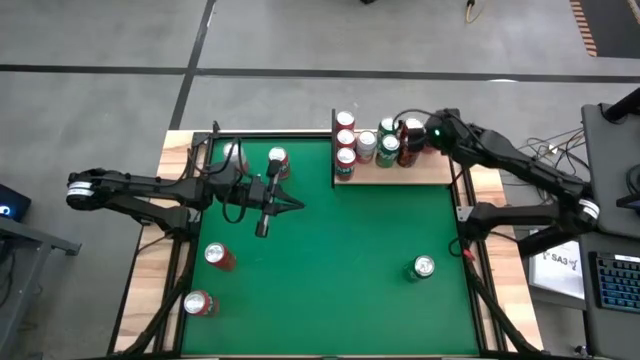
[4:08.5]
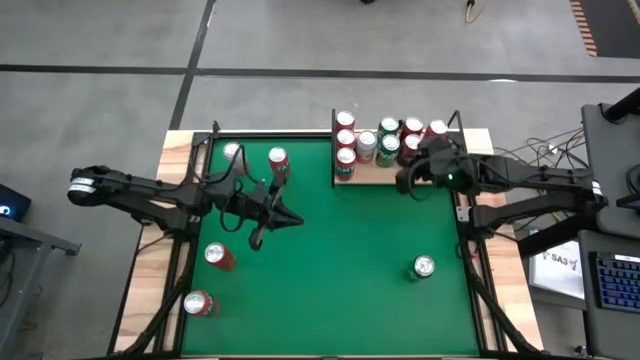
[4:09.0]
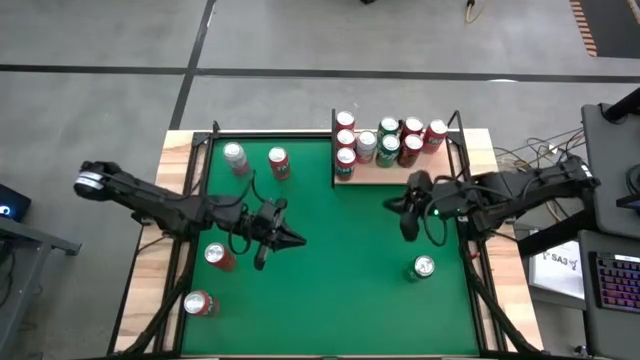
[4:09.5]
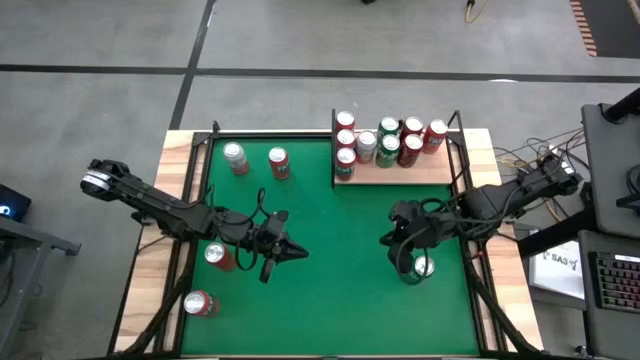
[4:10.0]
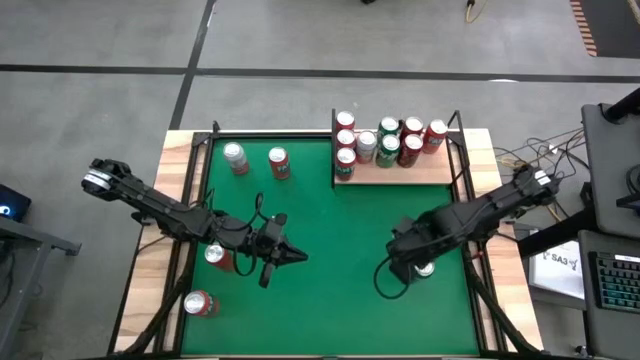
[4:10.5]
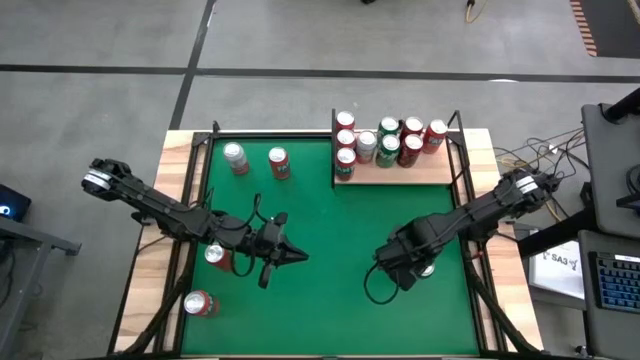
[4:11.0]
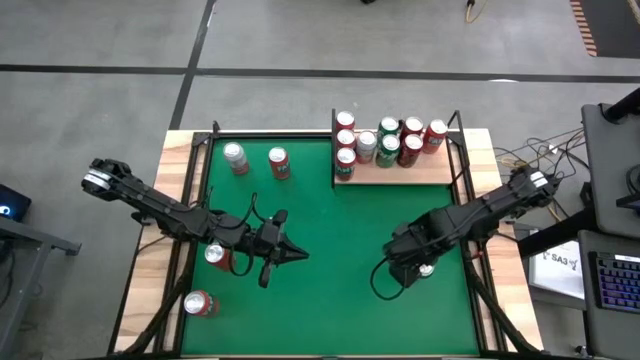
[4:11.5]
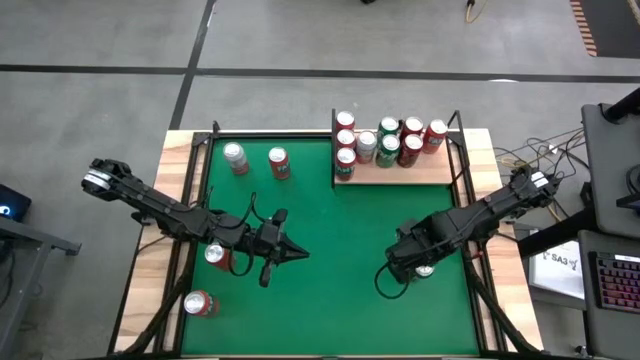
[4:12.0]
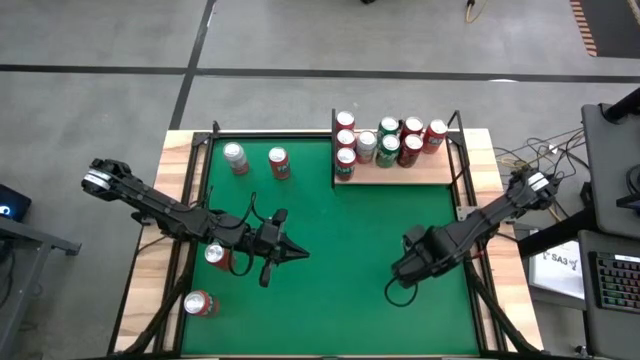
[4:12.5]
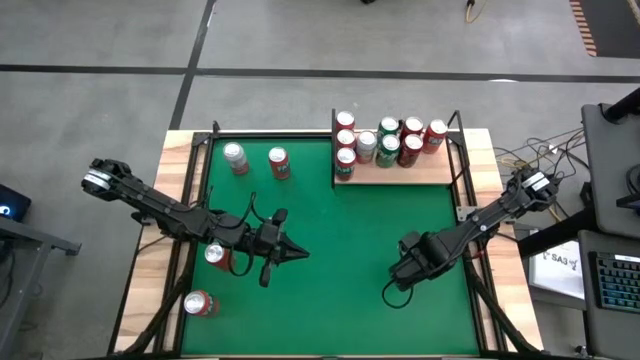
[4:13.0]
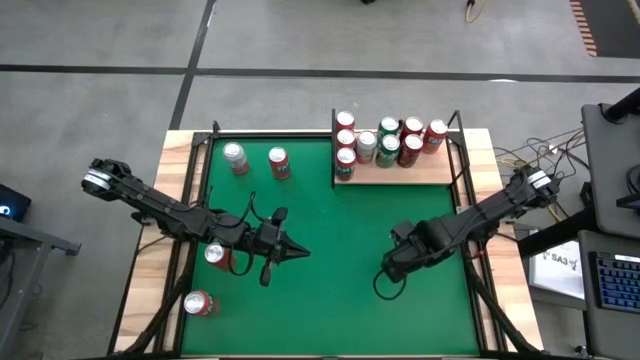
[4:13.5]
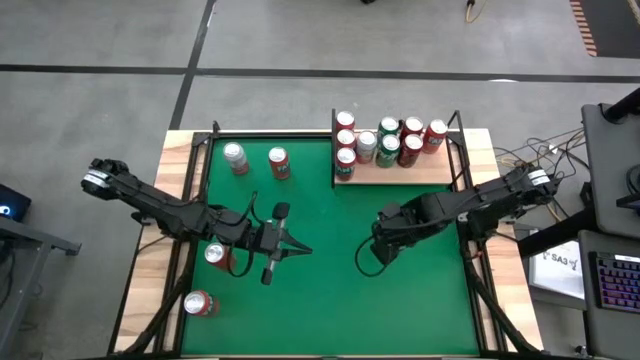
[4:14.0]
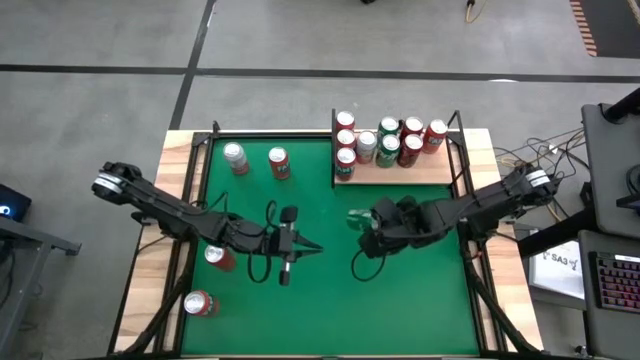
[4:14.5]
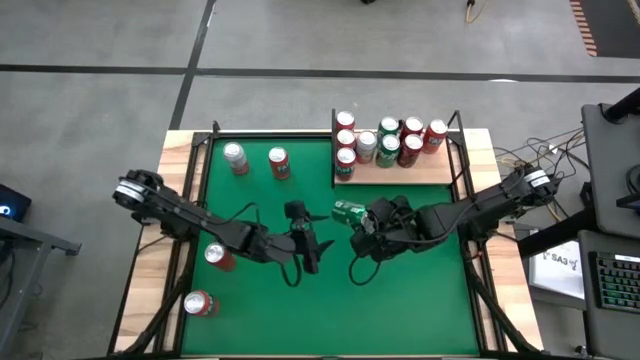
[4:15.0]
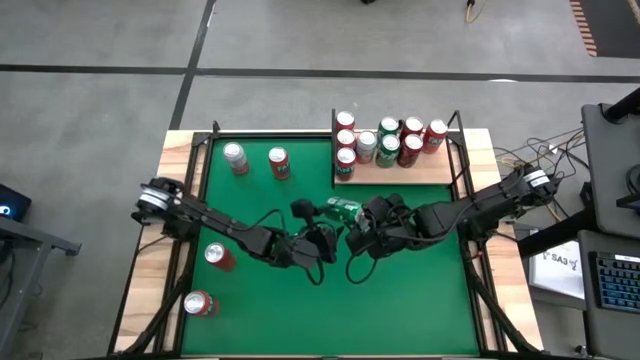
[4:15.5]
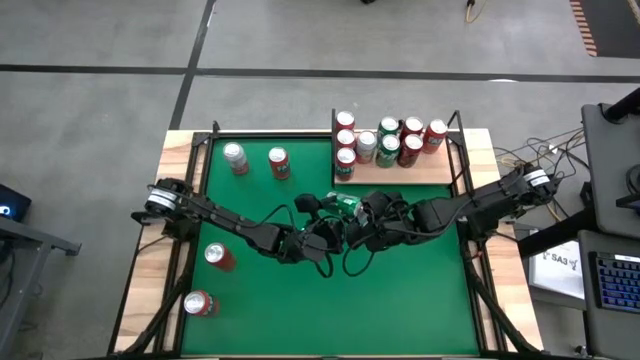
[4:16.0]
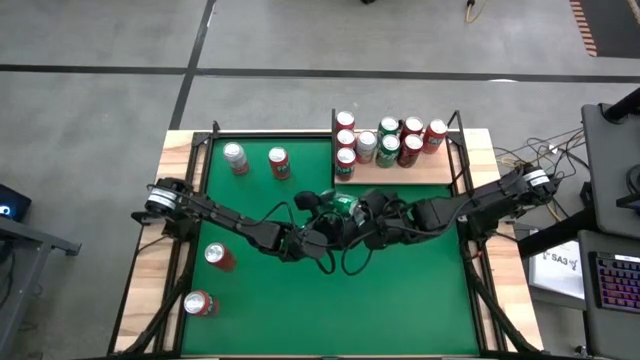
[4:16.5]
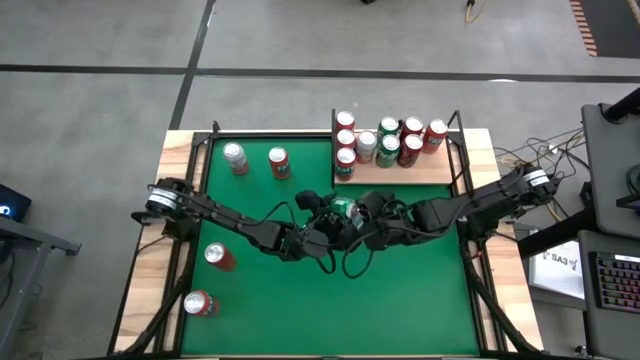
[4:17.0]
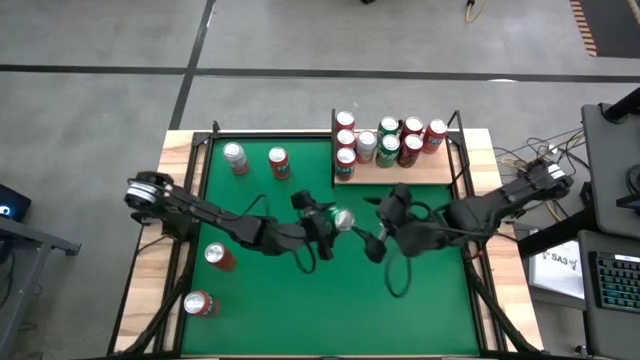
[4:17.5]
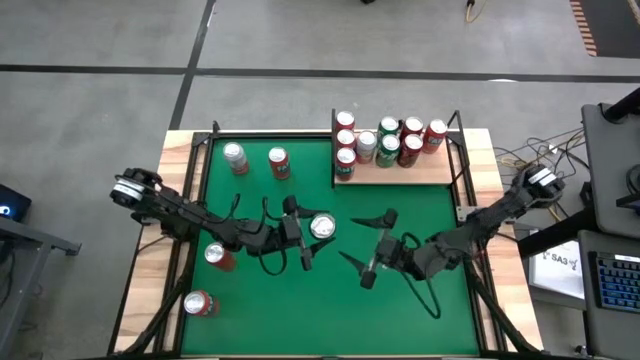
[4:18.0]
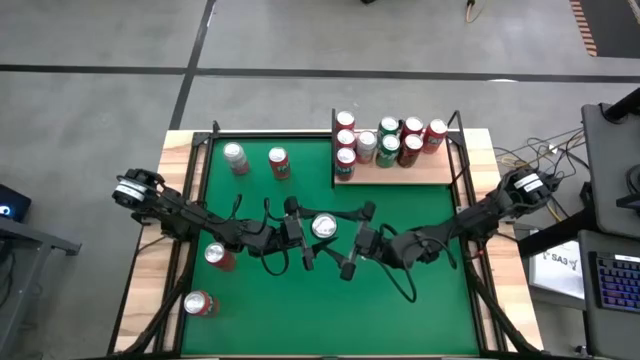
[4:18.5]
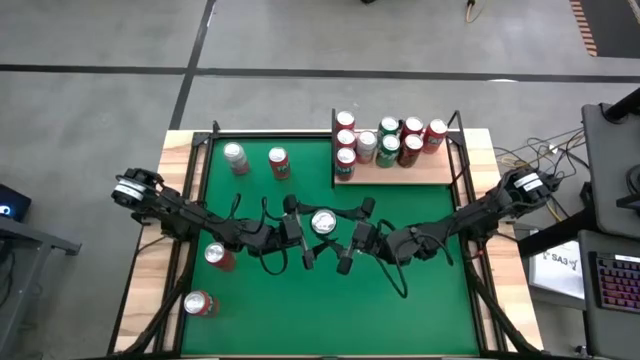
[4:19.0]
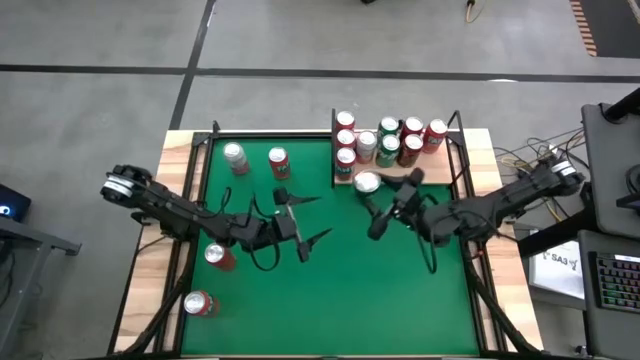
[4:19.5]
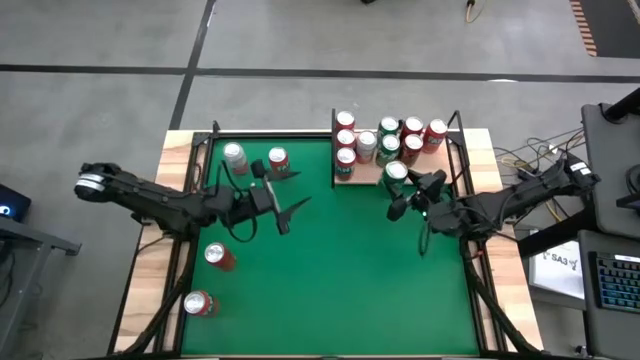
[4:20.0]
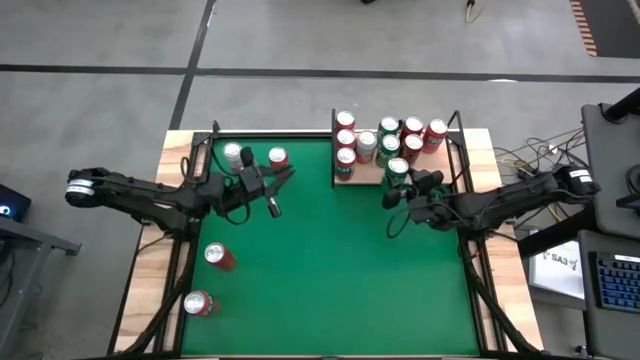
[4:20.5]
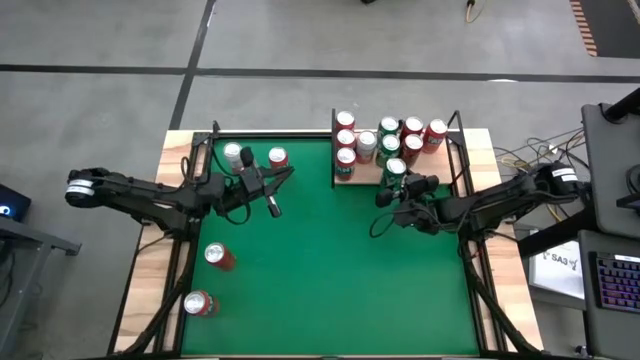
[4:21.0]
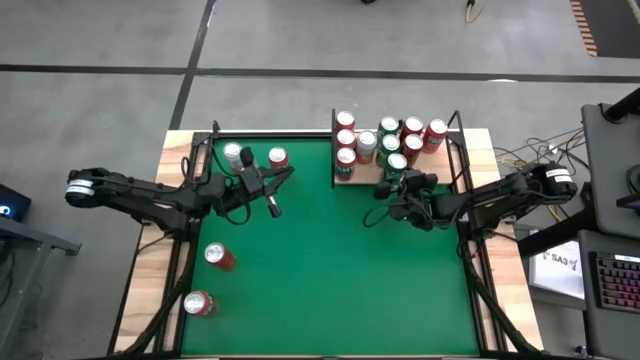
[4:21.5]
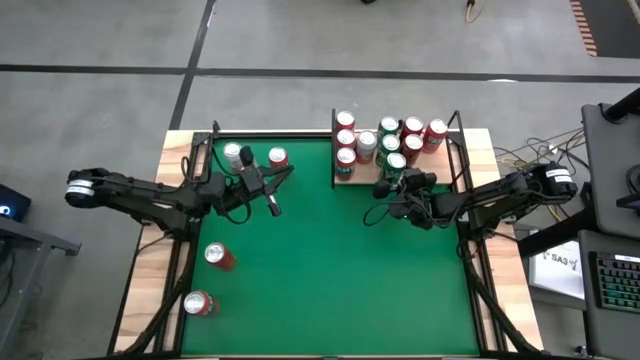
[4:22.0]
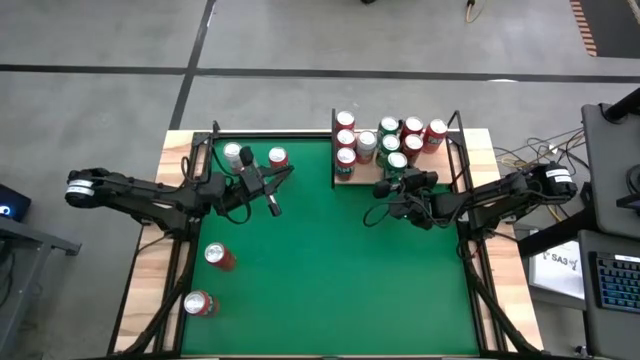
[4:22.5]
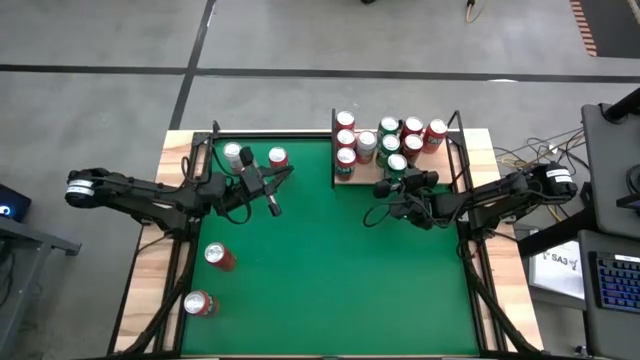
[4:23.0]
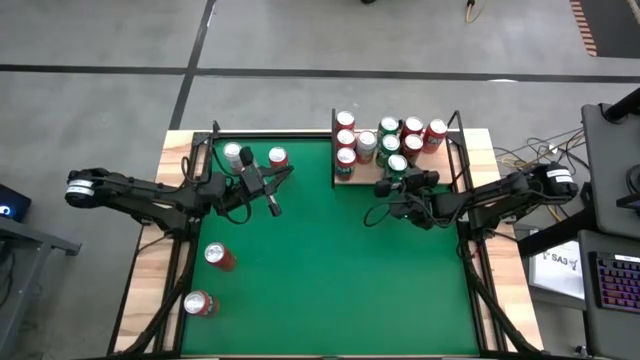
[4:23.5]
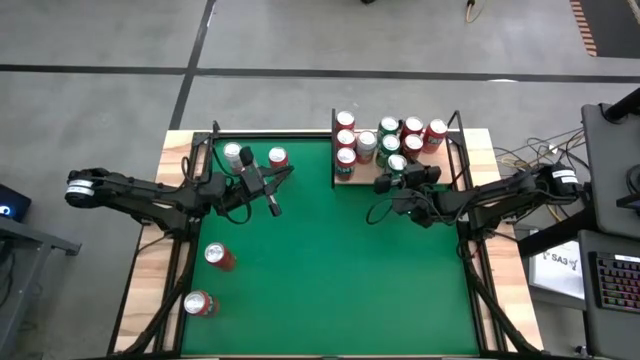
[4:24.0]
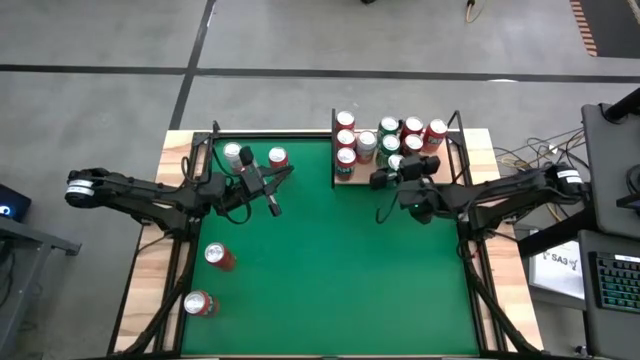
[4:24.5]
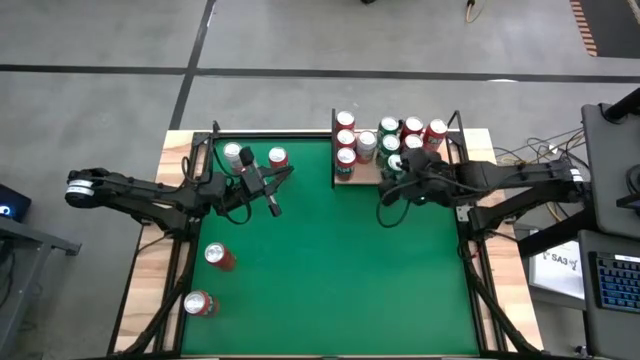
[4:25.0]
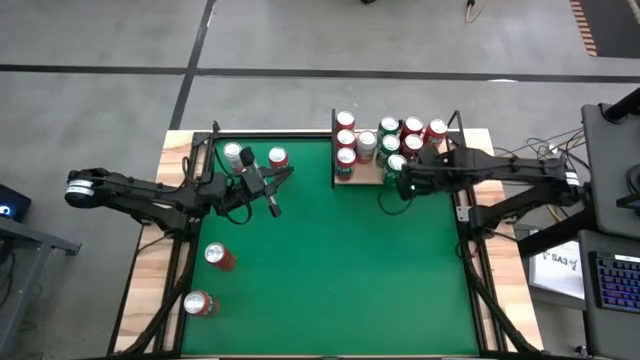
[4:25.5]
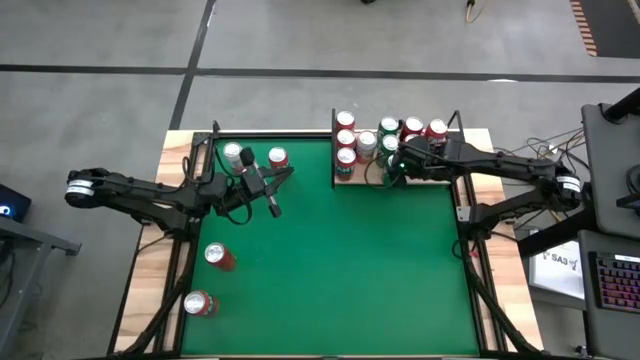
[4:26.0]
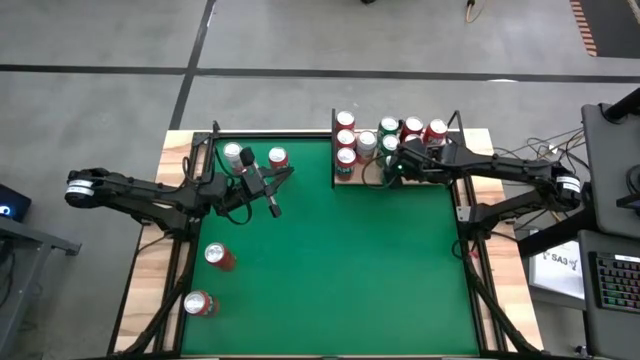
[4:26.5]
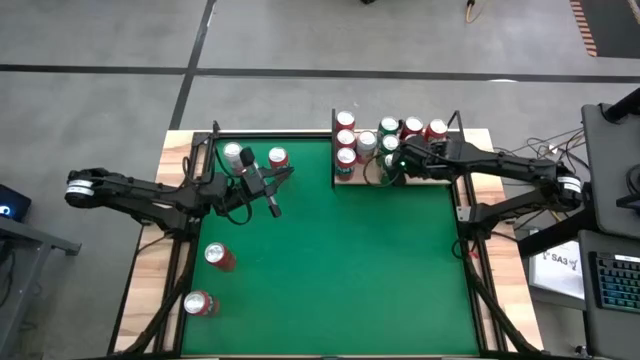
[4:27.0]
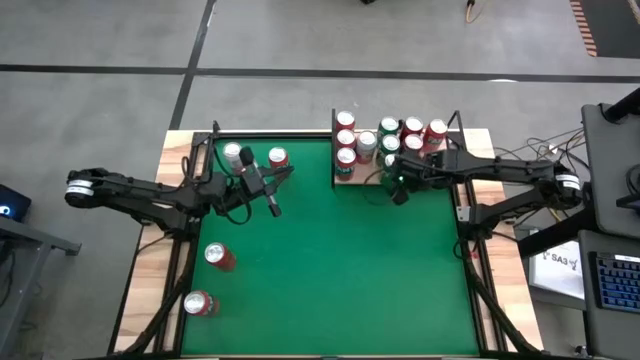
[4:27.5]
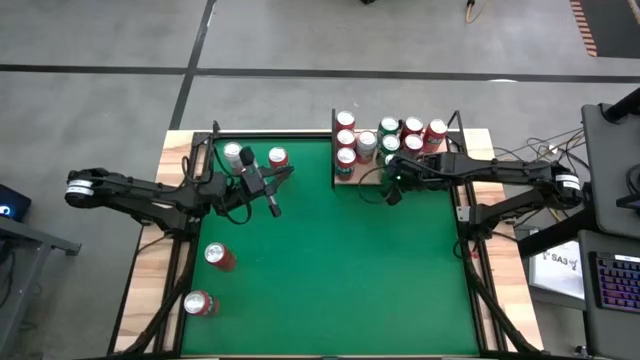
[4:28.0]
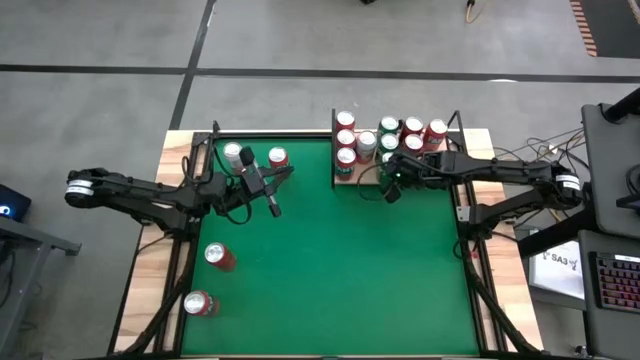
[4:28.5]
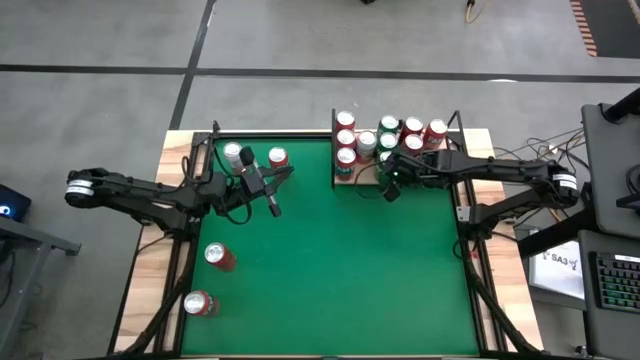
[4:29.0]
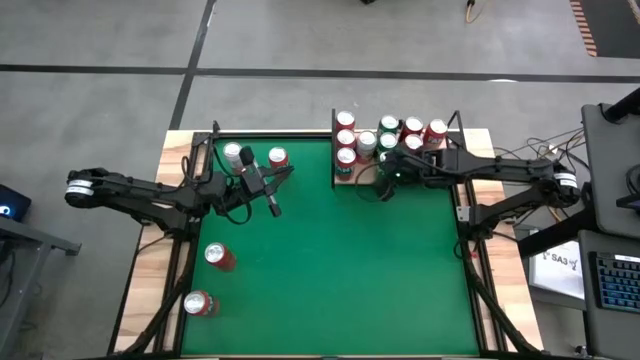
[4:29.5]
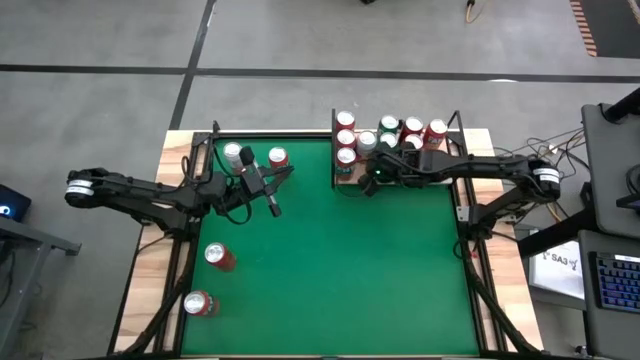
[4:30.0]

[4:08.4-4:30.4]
Task: Place canned beverage on shelf
Put the green soda can on the shelf aligned with the other green soda cans
